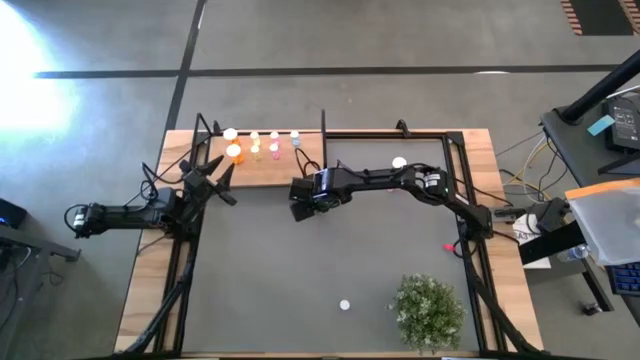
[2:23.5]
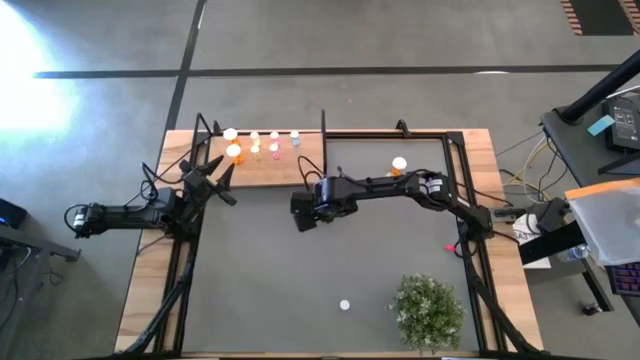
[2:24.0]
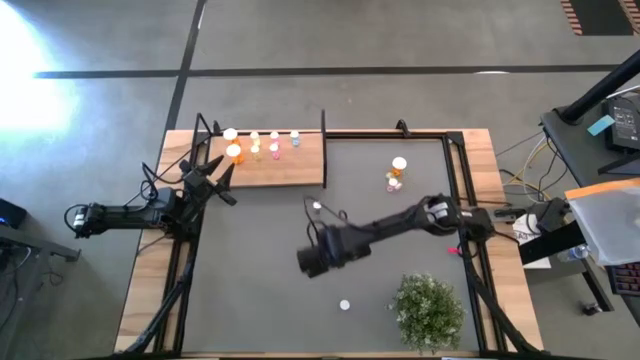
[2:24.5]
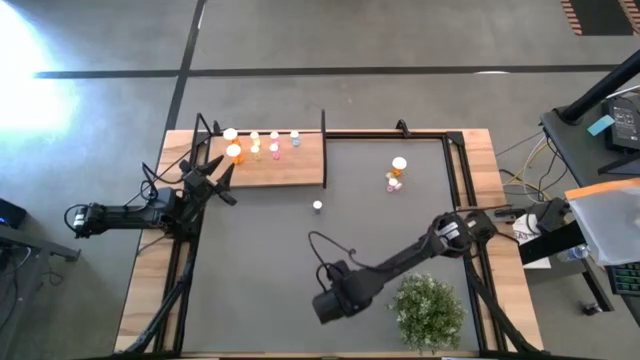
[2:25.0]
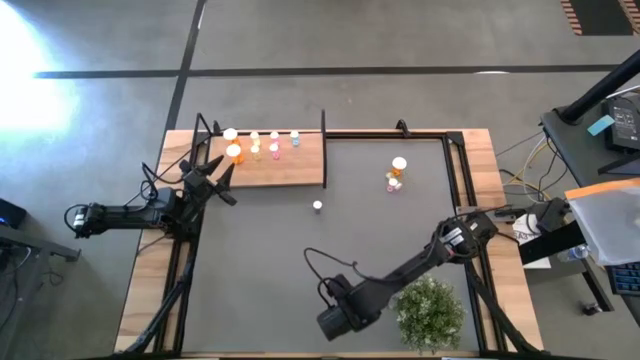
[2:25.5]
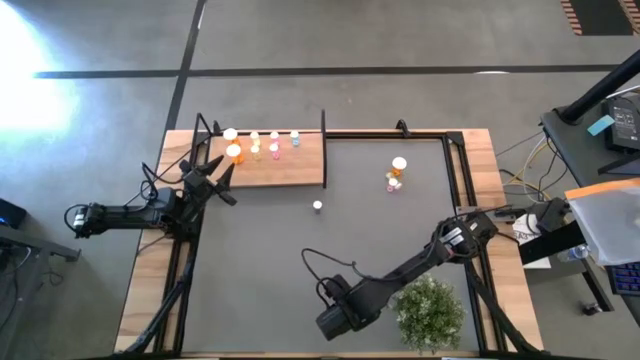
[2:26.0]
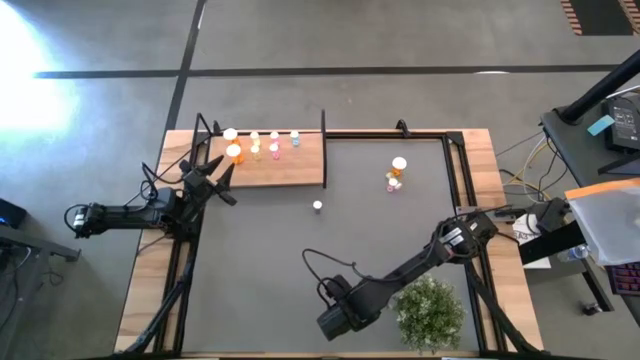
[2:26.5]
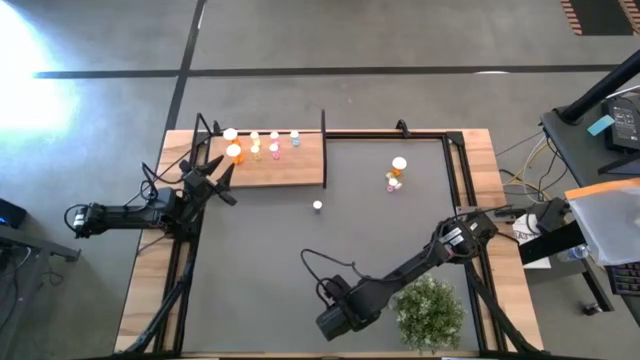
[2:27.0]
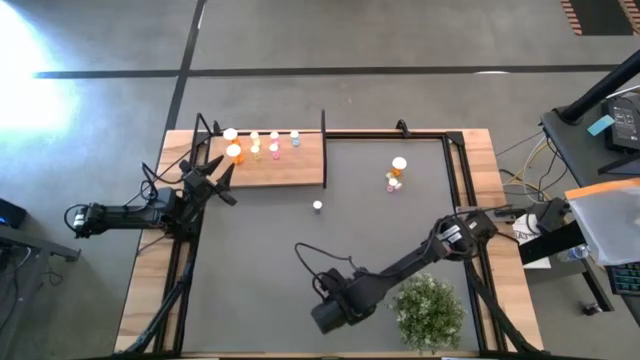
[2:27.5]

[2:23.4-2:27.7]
Task: Pick and place medicine bottles onto shelf by color
Move the bottom blue pill bottle to the middle of the table

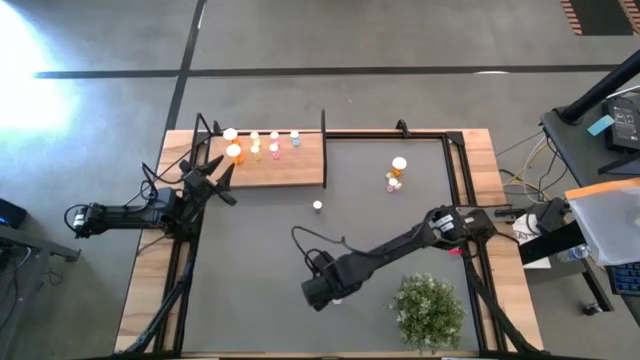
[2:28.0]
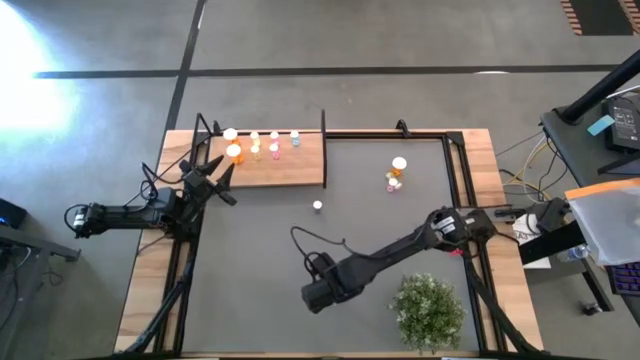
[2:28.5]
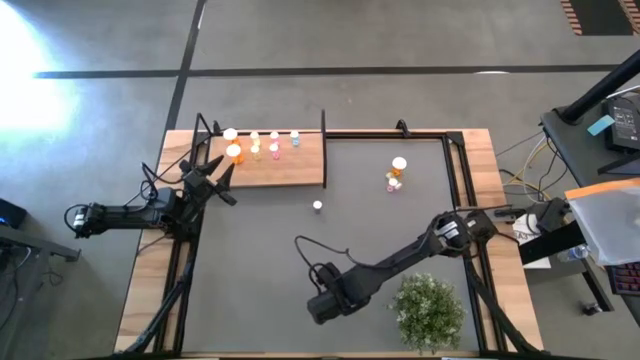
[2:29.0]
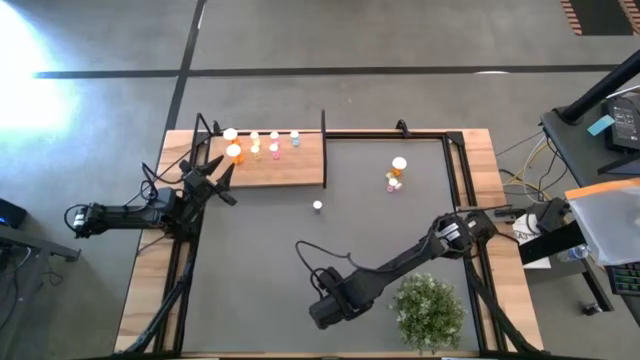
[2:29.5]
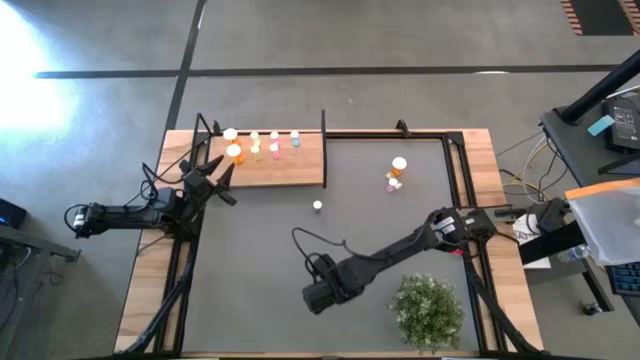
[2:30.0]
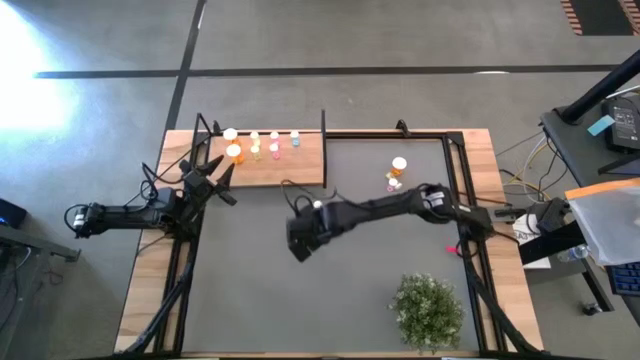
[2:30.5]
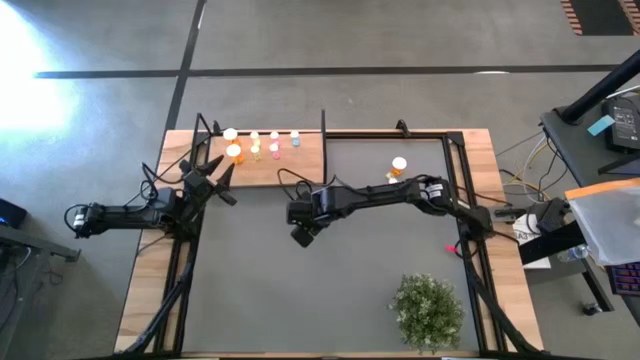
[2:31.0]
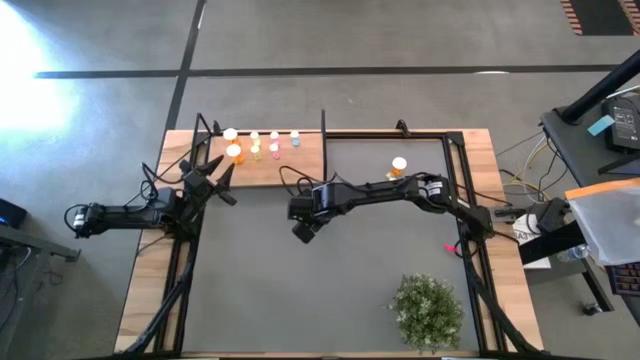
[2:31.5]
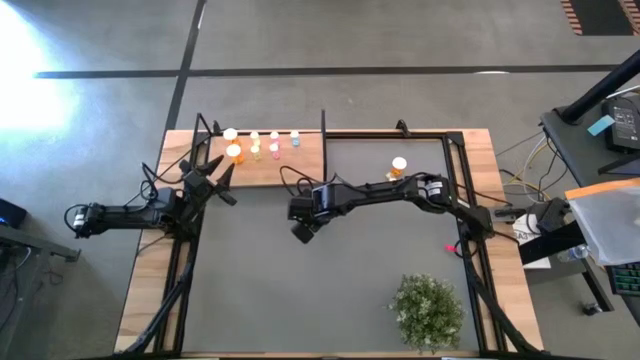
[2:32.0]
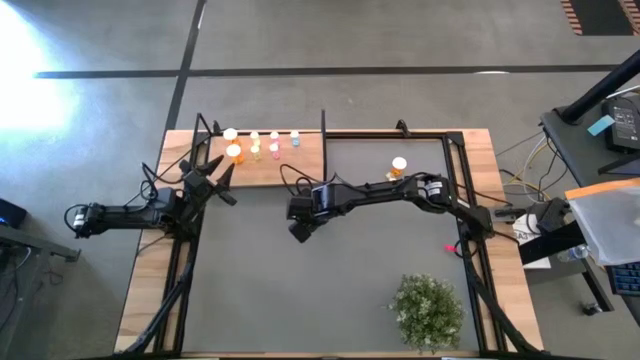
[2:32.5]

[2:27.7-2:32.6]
Move the bottom blue pill bottle to the middle of the table

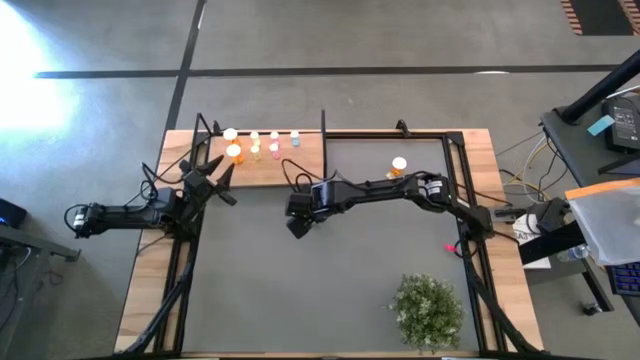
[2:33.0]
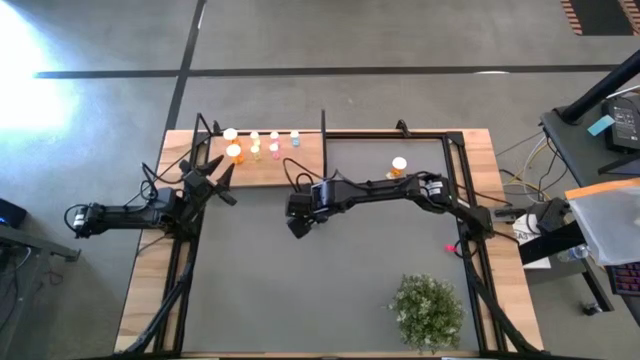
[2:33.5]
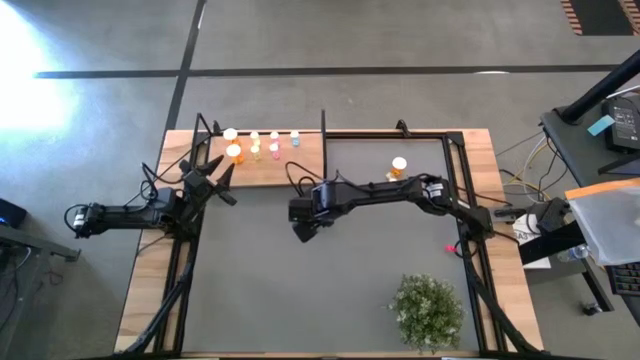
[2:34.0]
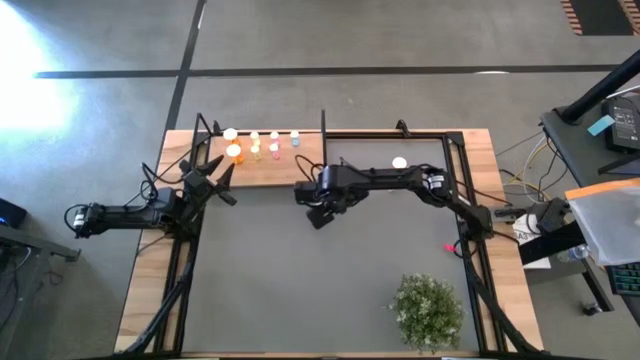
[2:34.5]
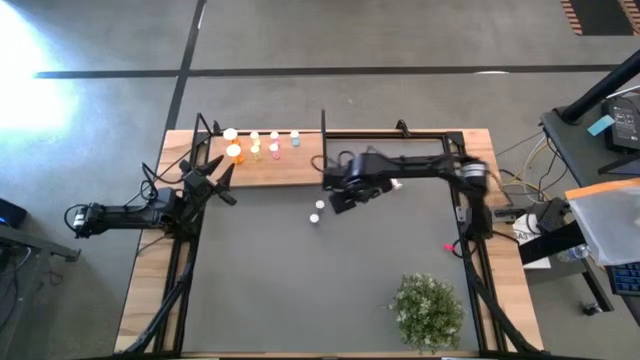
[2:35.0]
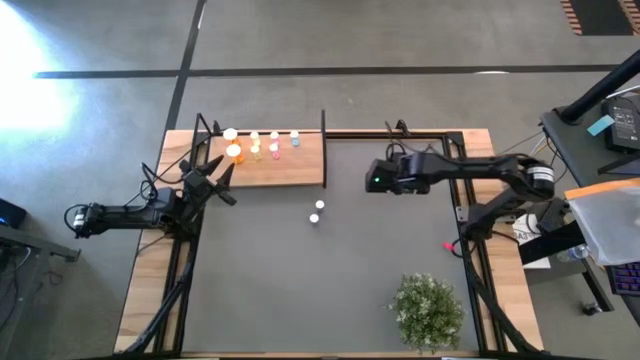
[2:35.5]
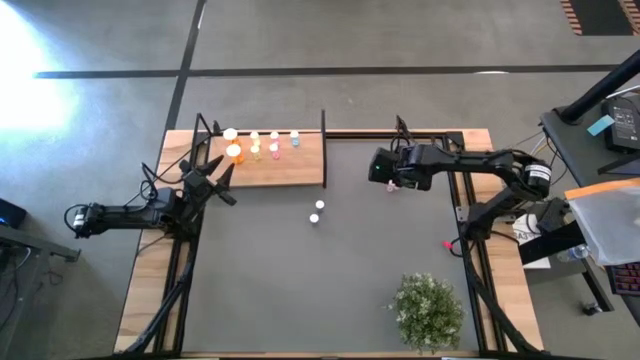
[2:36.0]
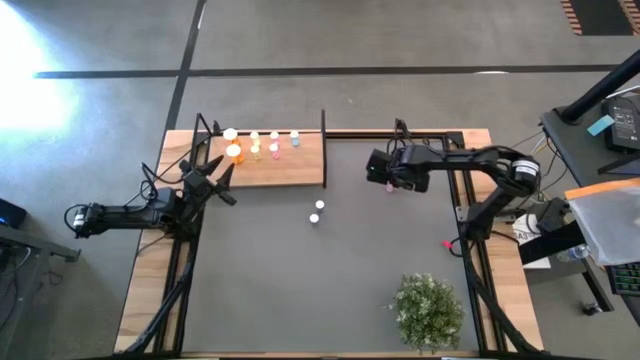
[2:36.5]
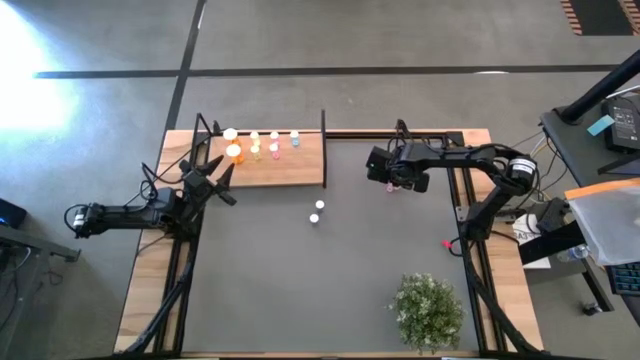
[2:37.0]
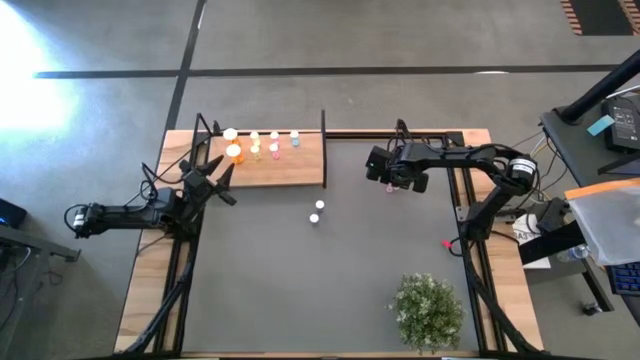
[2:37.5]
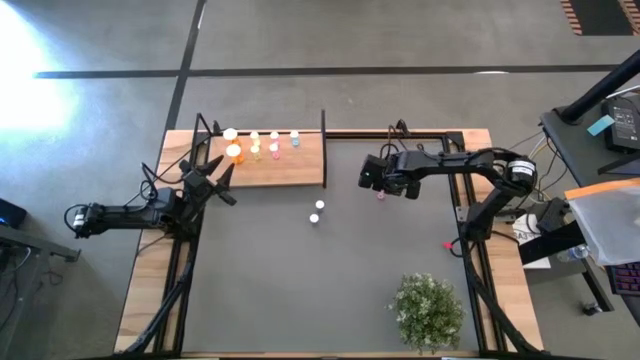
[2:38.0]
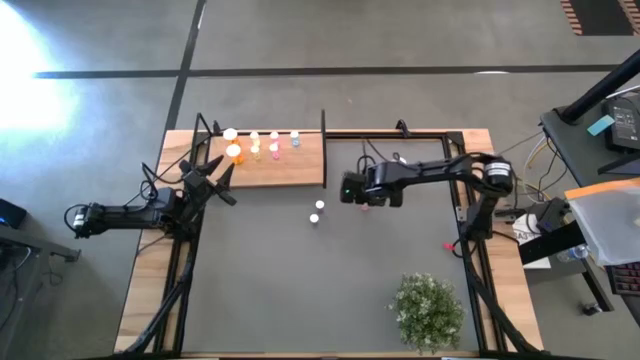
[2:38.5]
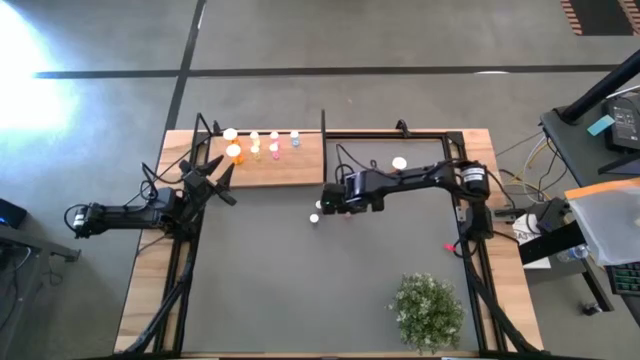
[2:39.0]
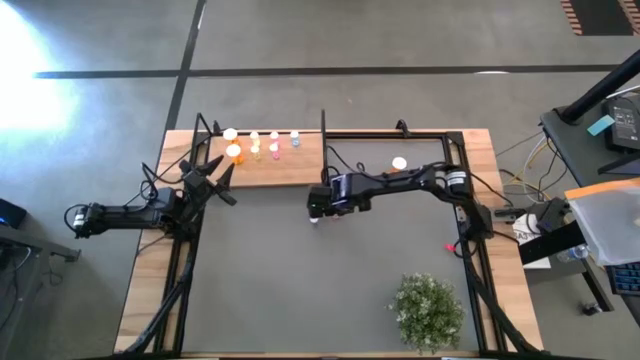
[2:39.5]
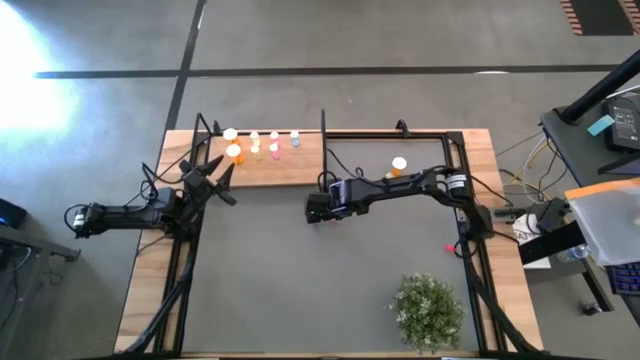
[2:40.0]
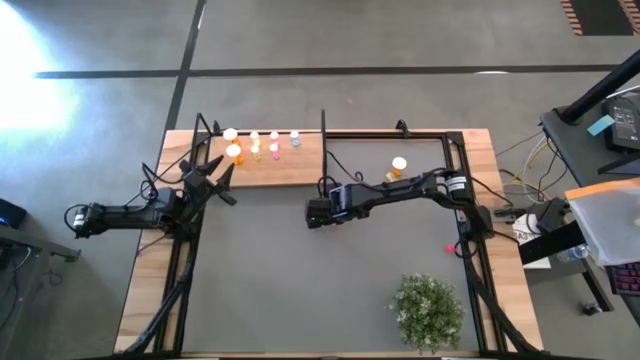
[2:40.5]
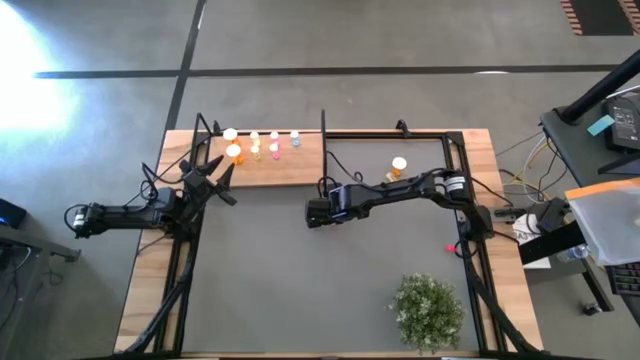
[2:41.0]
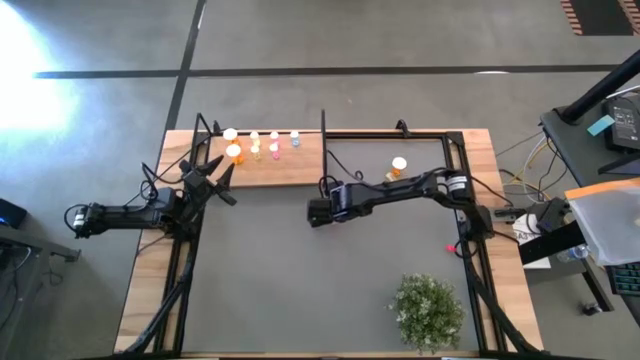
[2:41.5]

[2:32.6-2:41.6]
Move the pink pill bottle to the middle of the table

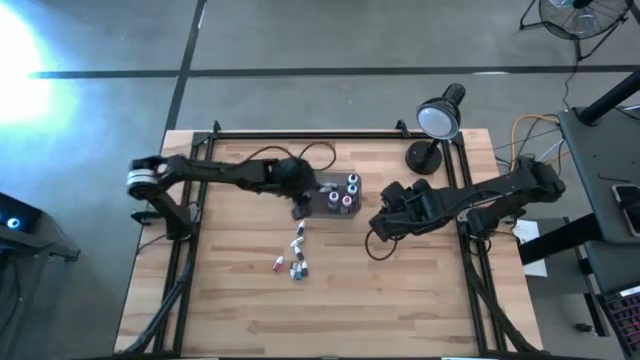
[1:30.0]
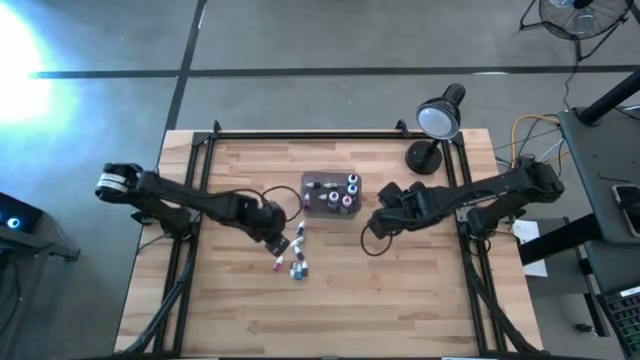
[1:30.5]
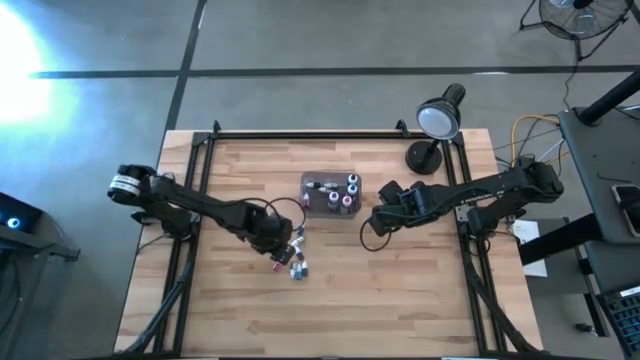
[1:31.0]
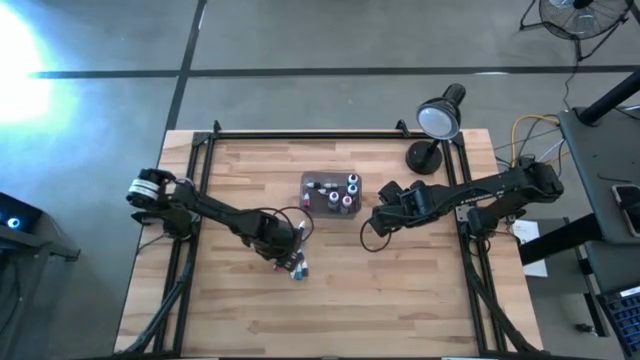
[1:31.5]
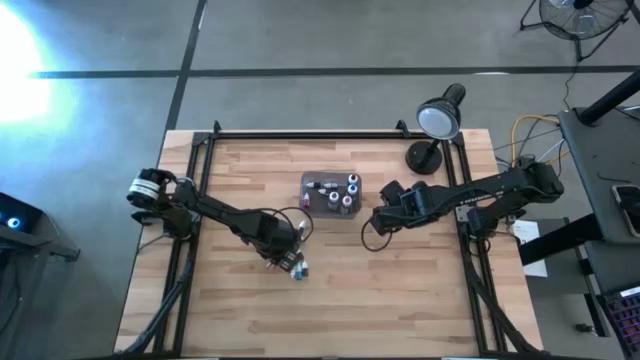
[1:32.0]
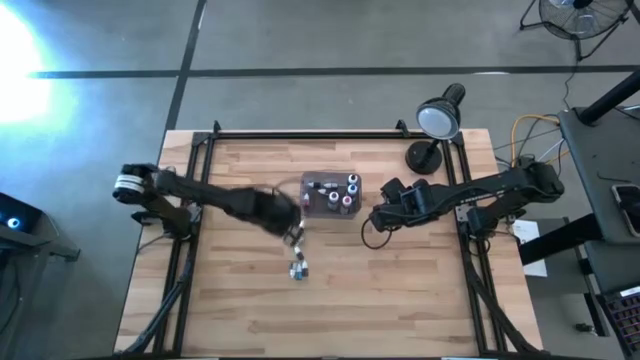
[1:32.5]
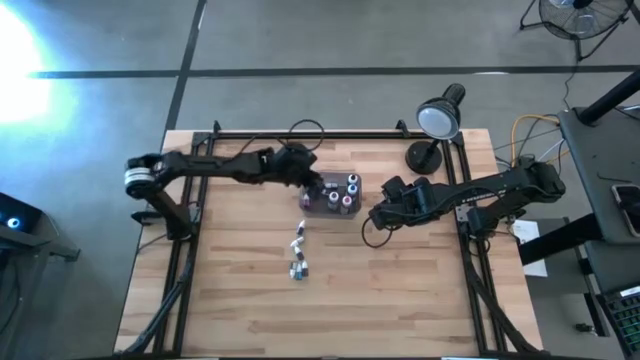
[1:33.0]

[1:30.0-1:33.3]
Task: Pick & Place food coloring
Put the small red food coloring bottle into the bin
